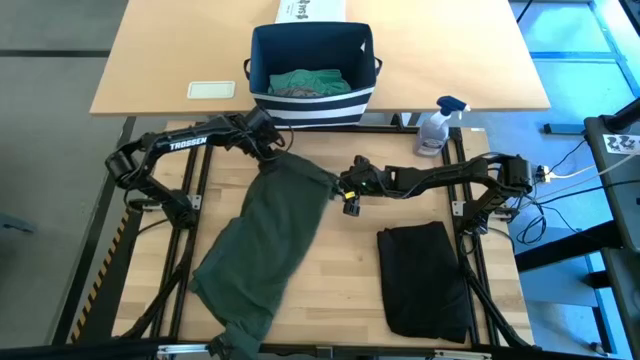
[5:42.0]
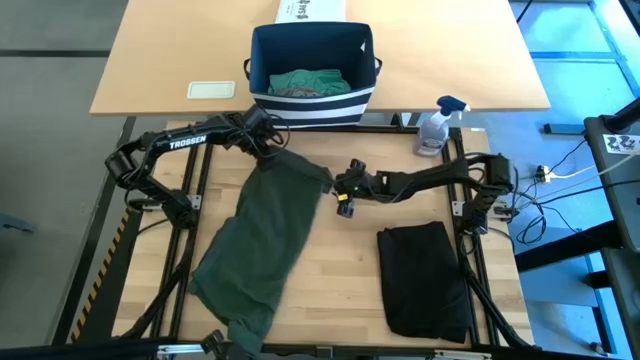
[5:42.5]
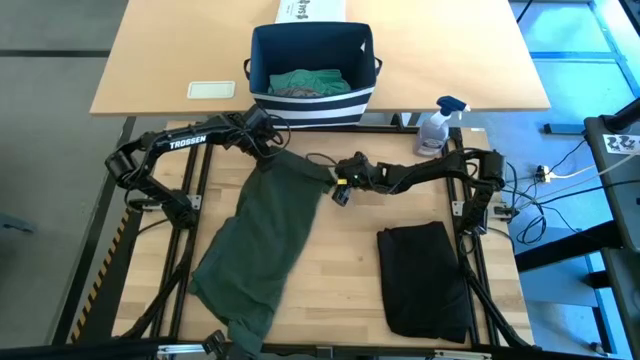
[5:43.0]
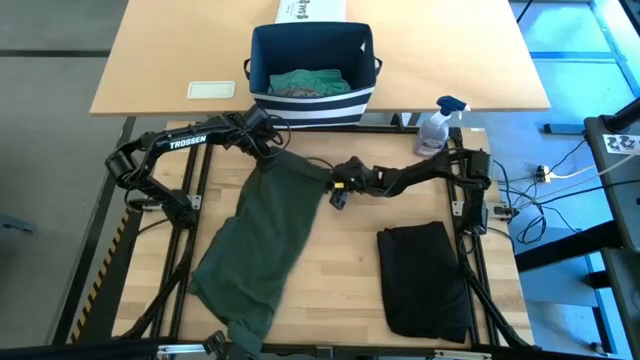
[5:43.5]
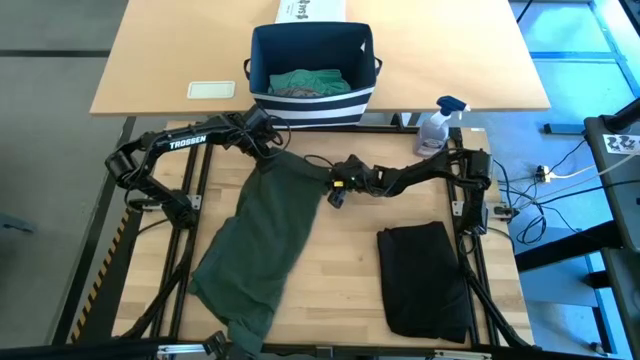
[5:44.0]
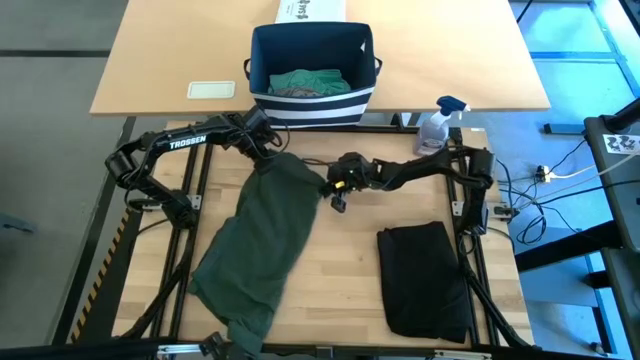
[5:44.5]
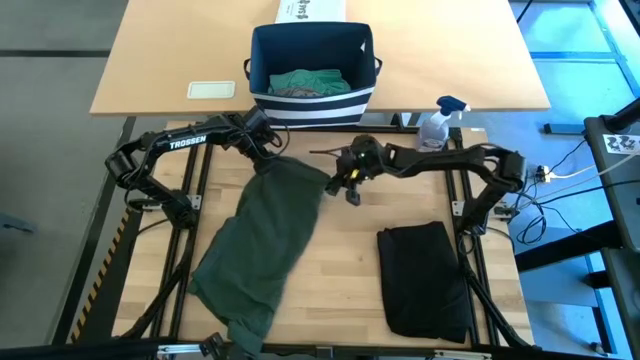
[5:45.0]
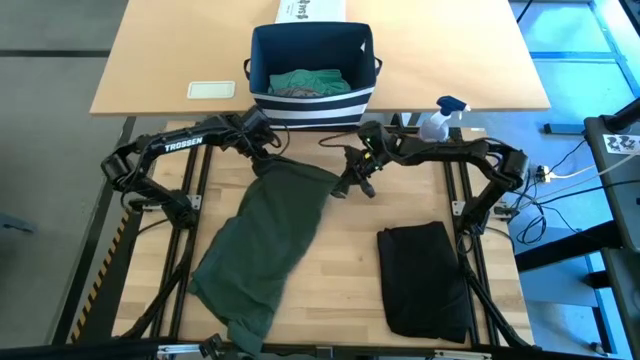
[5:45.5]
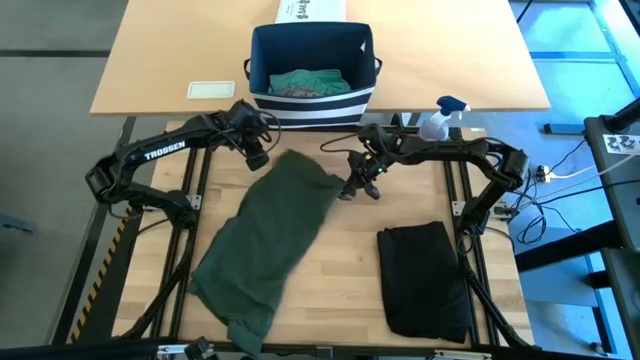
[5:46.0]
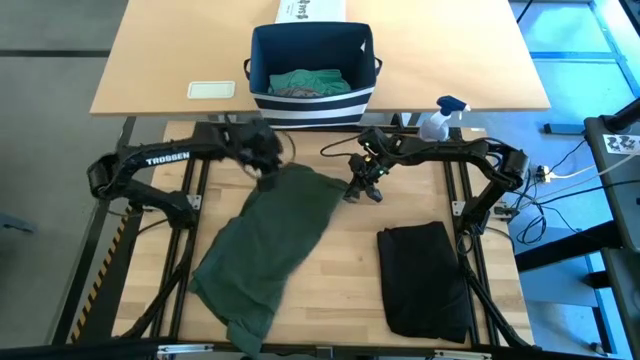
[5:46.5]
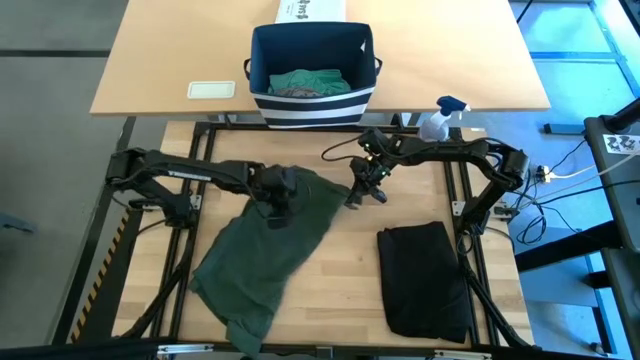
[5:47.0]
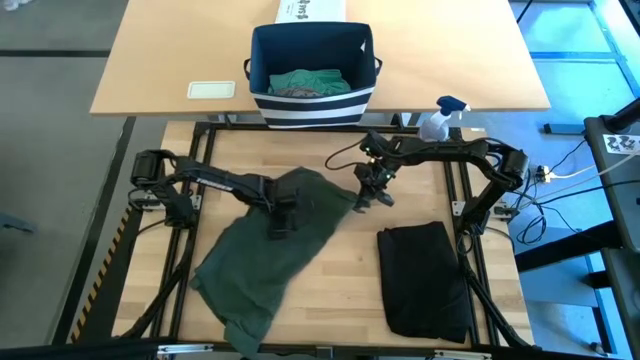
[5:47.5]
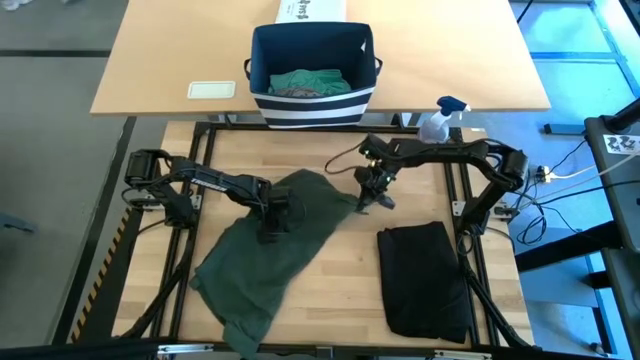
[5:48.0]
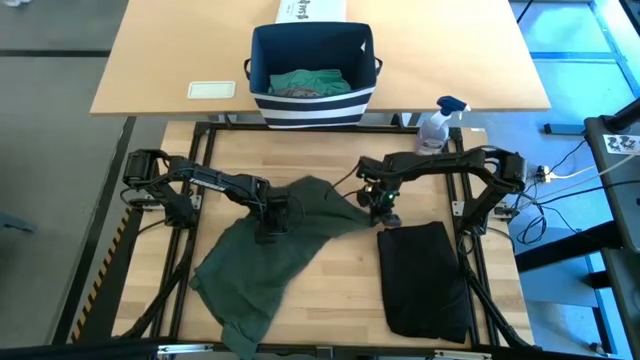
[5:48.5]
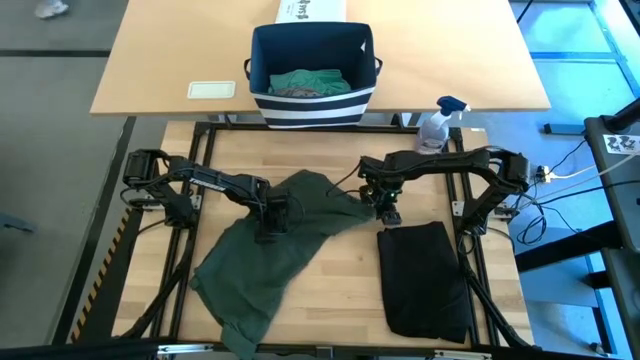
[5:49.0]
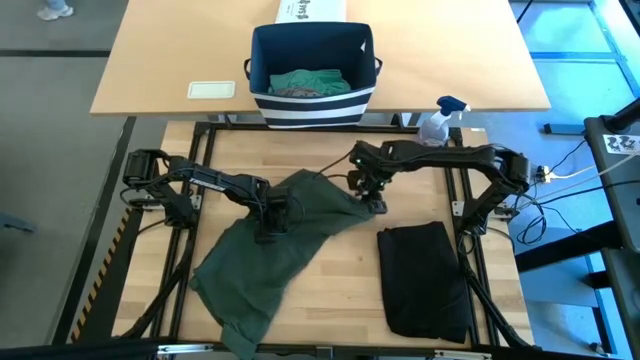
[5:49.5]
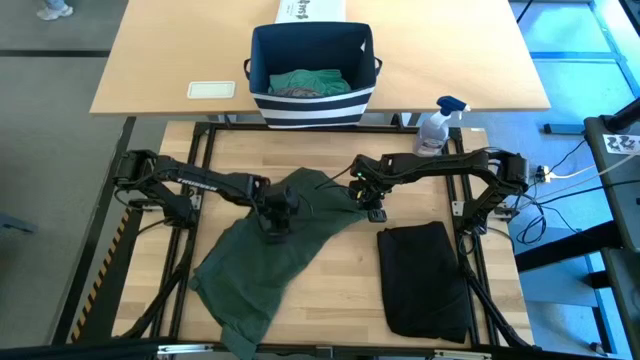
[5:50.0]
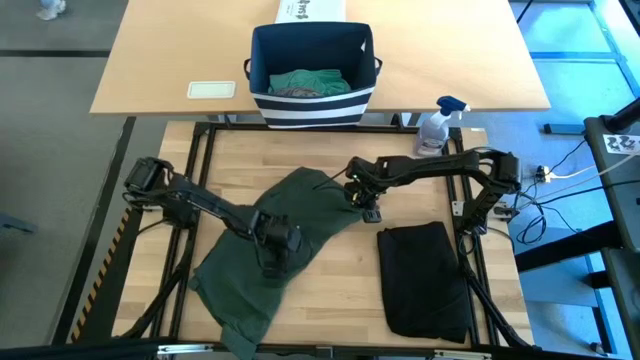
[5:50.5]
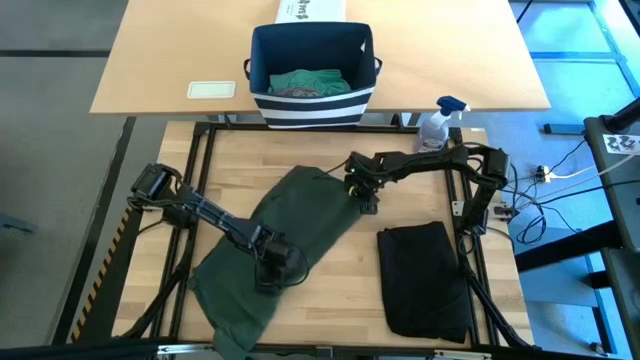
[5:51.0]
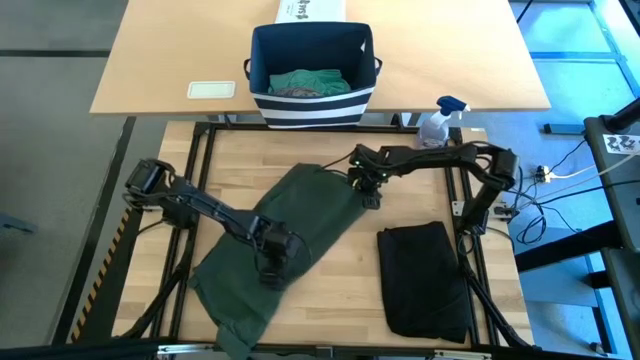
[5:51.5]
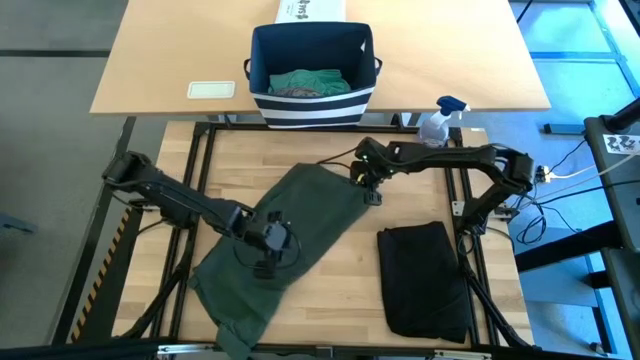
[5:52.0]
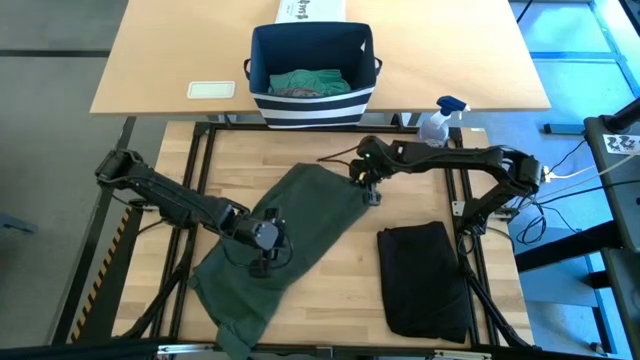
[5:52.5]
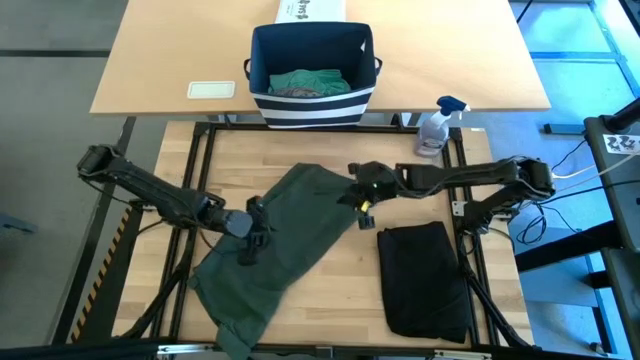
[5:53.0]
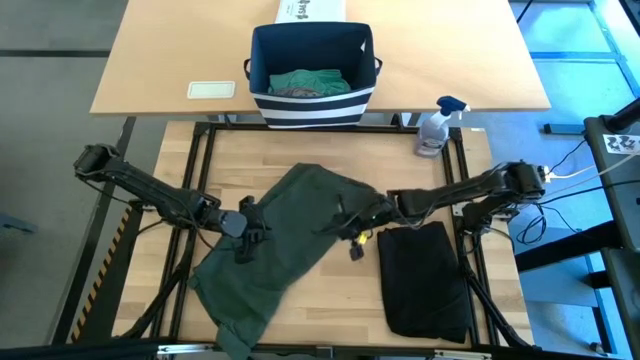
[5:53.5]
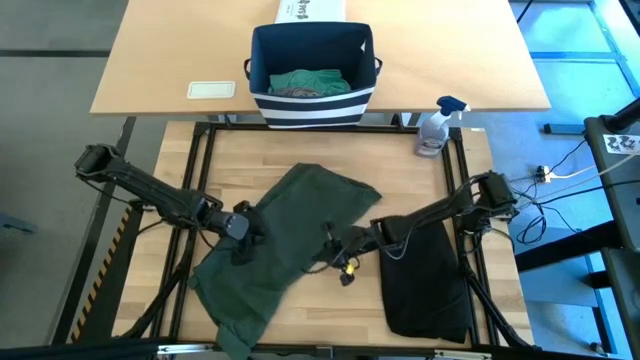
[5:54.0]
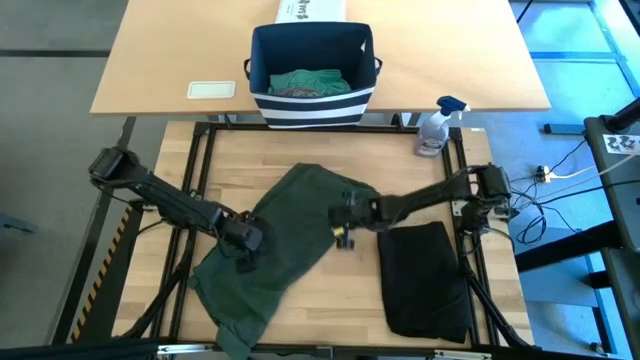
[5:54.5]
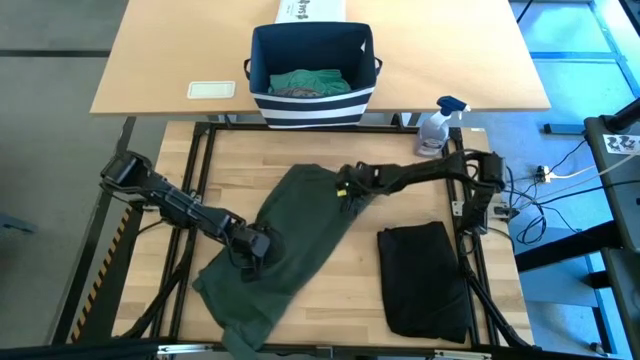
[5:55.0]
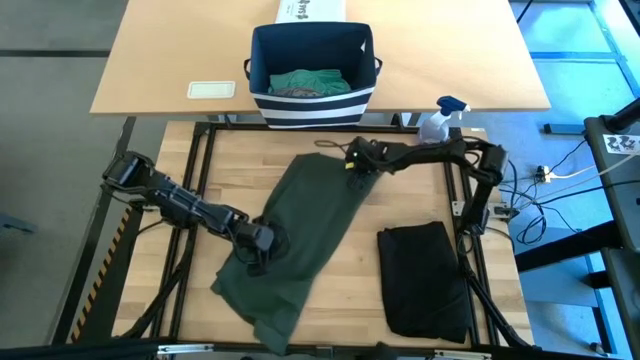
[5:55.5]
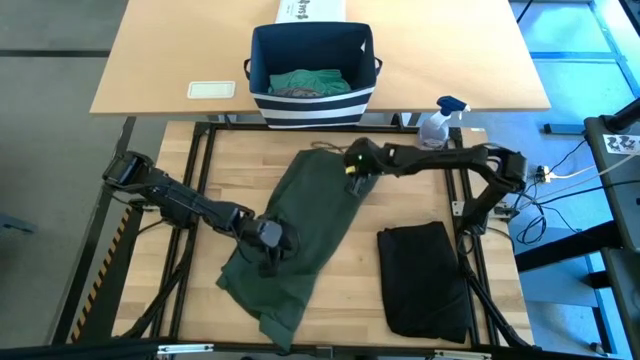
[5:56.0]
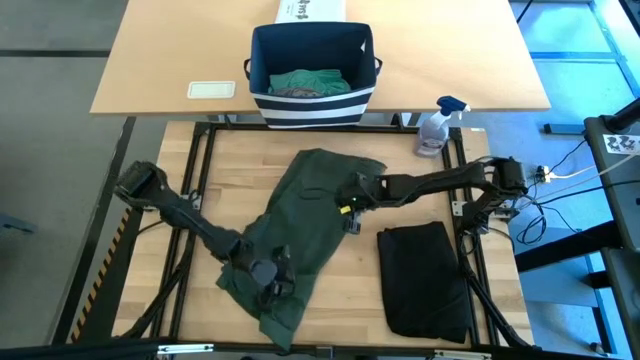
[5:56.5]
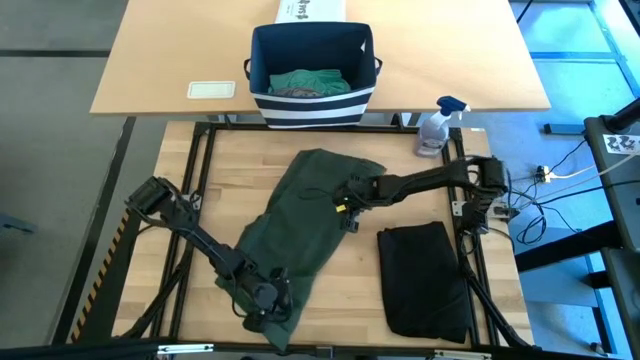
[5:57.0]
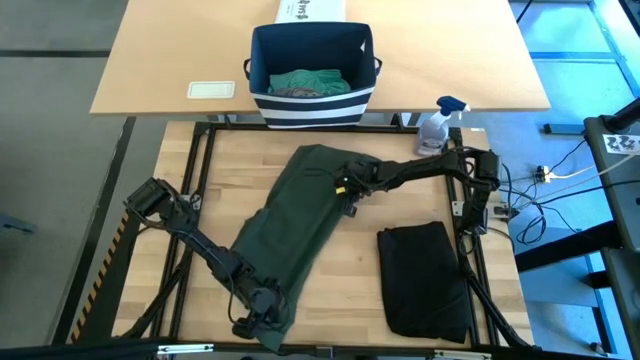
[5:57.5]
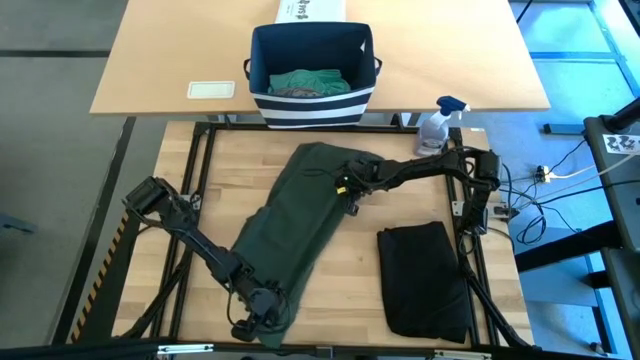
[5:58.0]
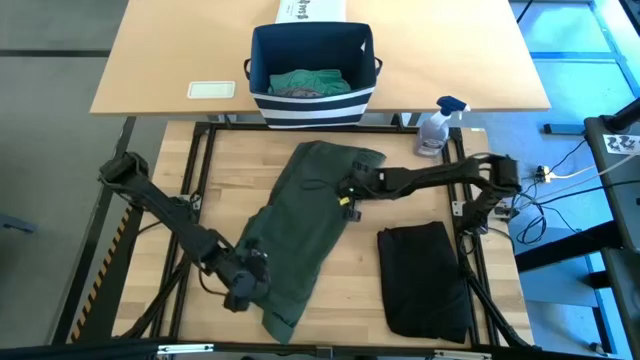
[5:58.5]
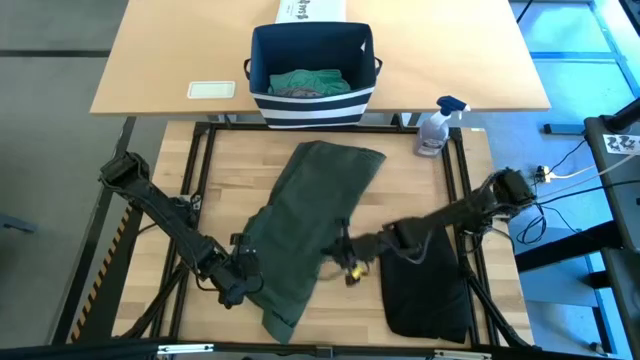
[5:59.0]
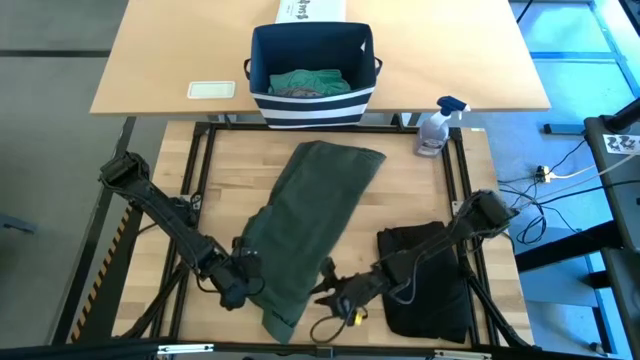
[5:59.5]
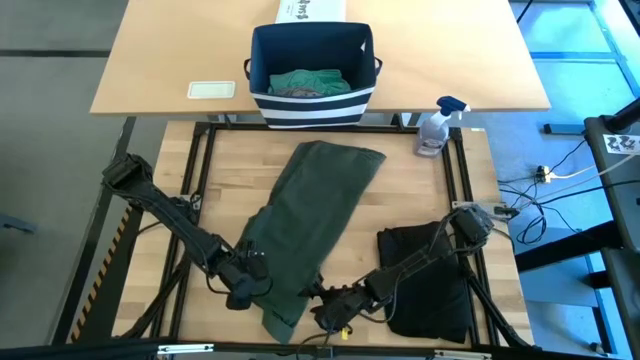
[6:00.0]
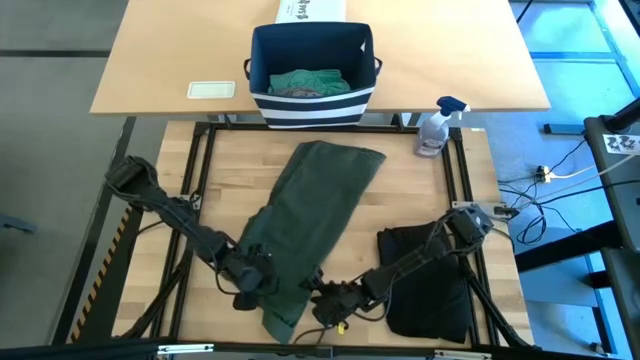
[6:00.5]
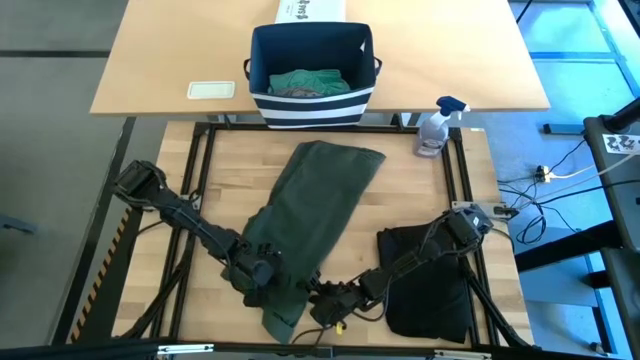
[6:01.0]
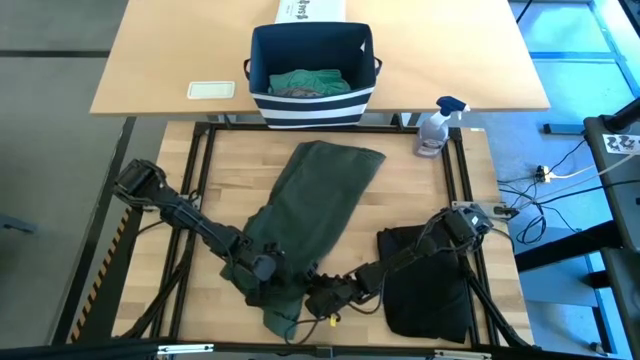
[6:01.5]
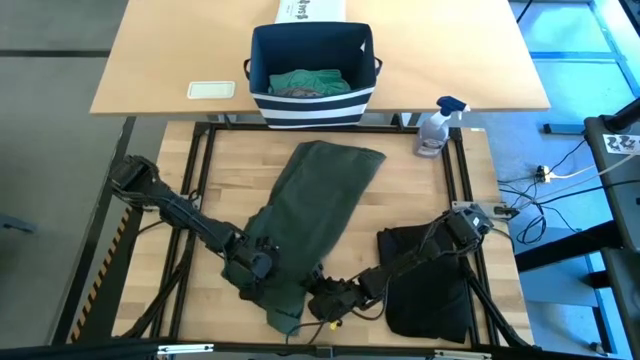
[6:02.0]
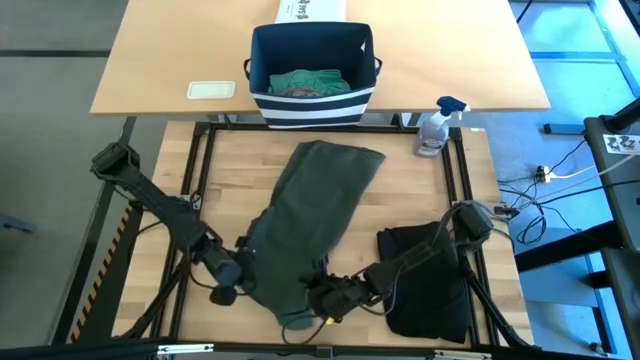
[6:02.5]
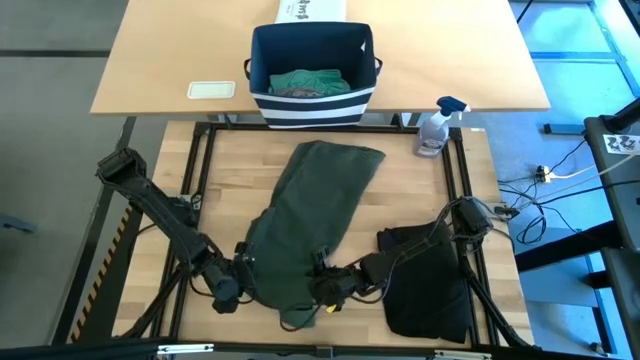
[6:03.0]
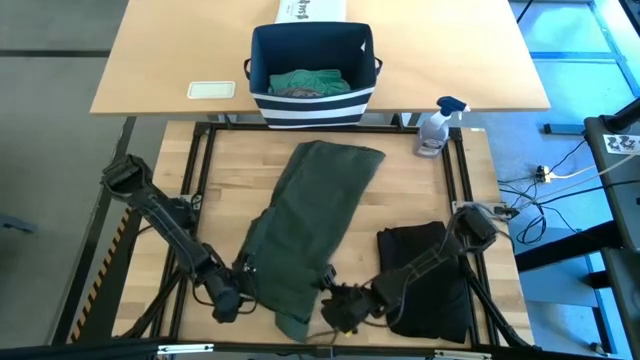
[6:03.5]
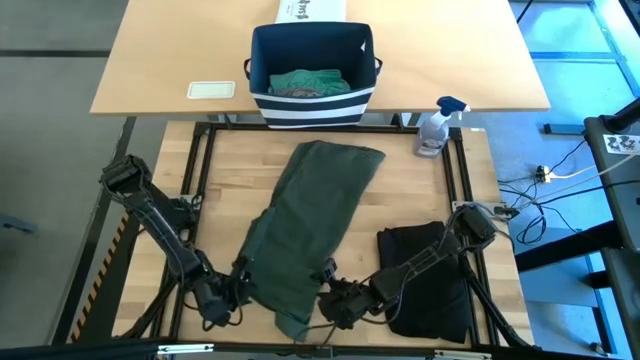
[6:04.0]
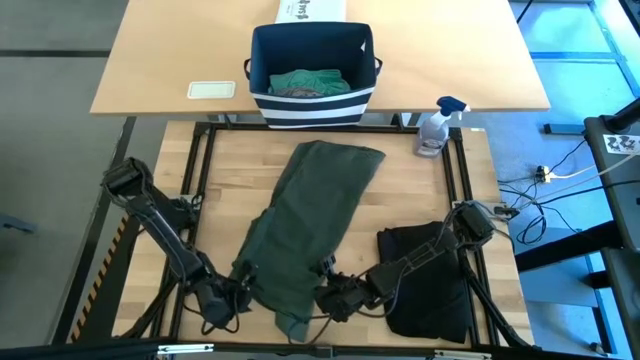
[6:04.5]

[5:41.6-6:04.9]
Task: Fold Laundry from Bin
Fold the green polo shirt
